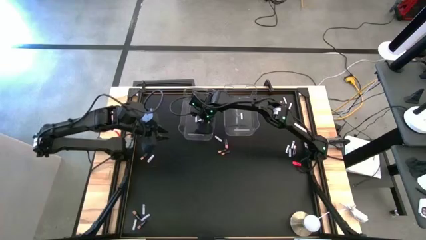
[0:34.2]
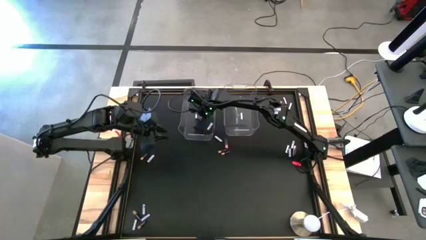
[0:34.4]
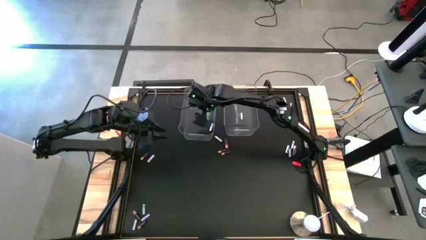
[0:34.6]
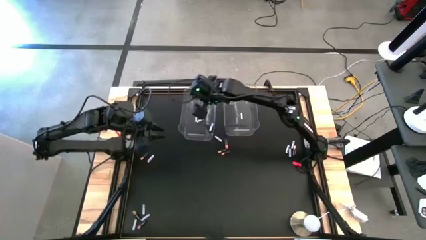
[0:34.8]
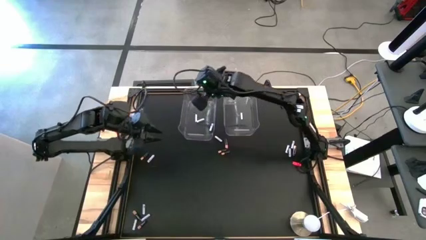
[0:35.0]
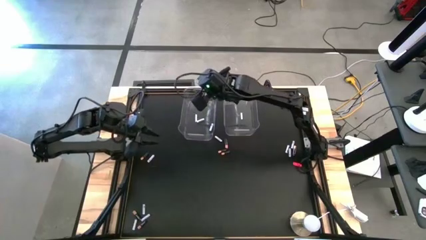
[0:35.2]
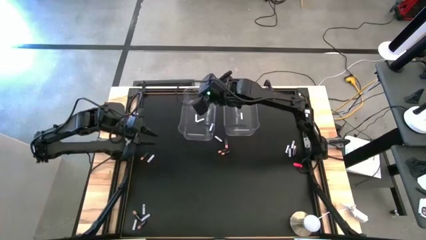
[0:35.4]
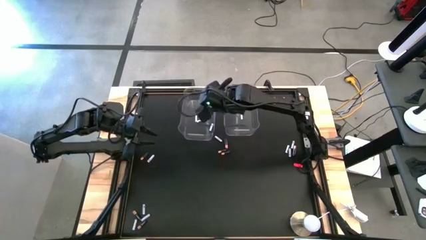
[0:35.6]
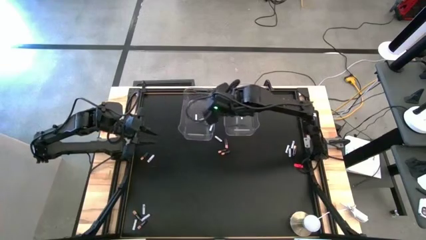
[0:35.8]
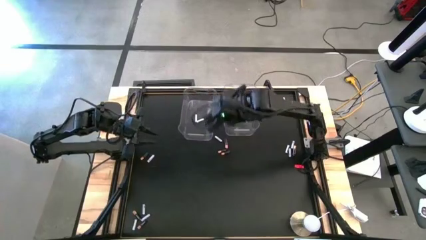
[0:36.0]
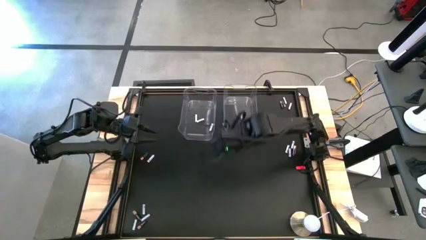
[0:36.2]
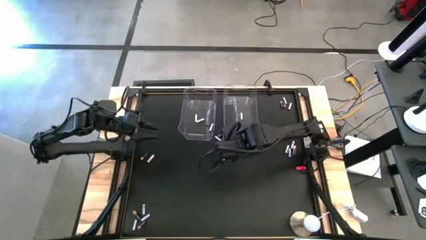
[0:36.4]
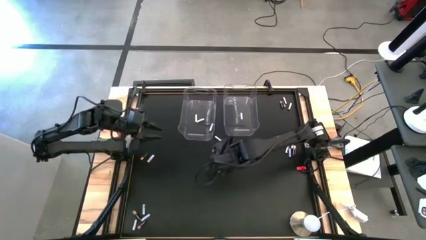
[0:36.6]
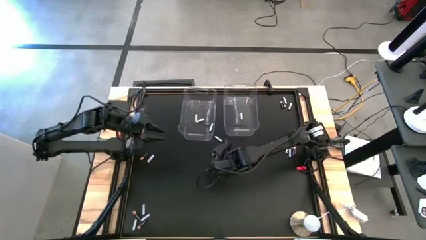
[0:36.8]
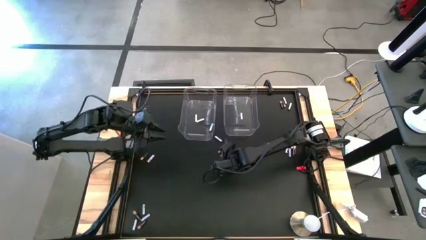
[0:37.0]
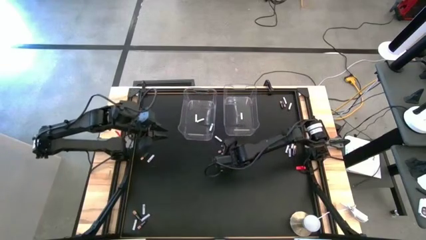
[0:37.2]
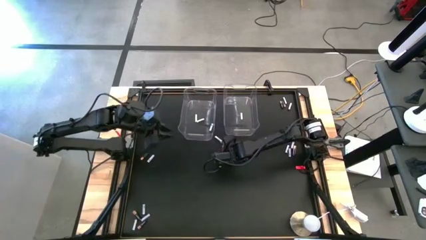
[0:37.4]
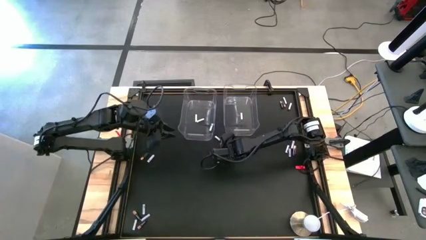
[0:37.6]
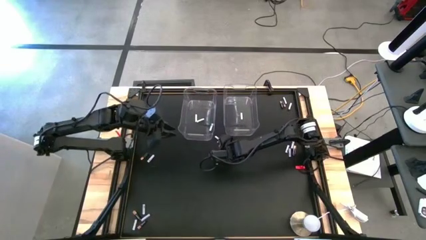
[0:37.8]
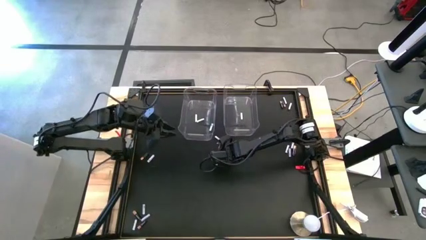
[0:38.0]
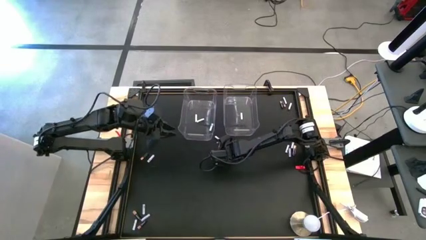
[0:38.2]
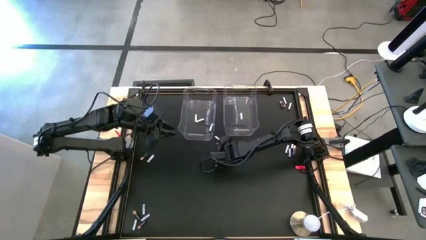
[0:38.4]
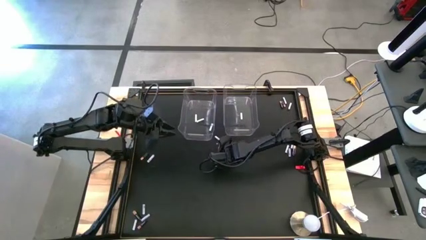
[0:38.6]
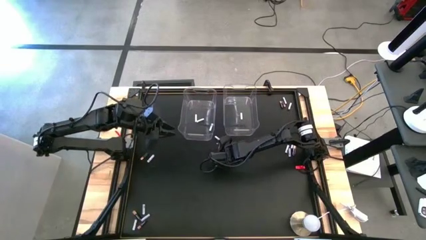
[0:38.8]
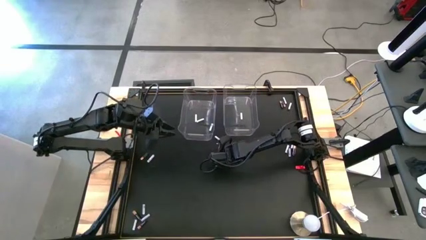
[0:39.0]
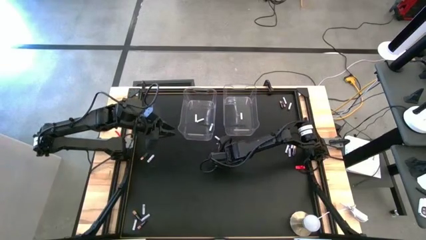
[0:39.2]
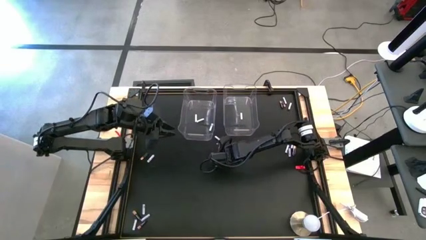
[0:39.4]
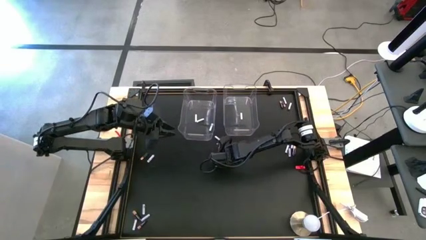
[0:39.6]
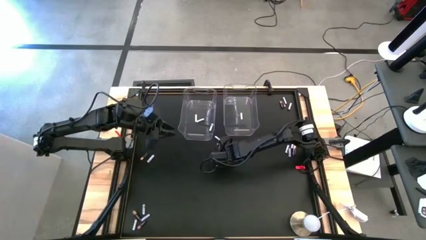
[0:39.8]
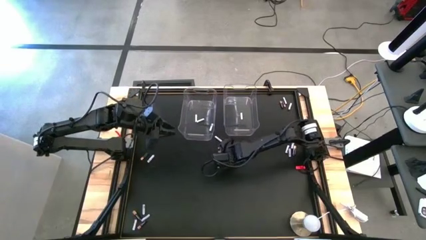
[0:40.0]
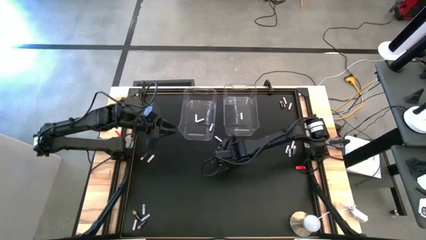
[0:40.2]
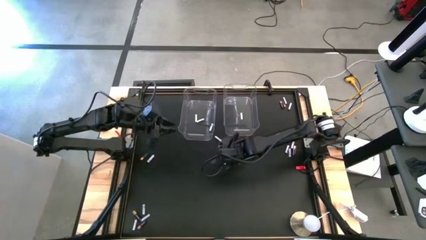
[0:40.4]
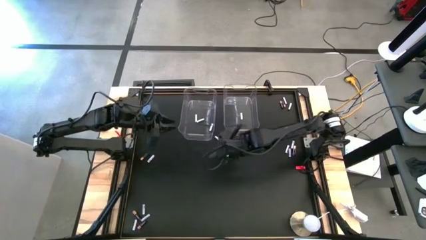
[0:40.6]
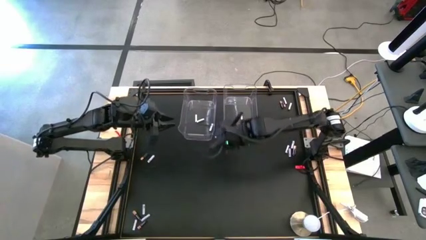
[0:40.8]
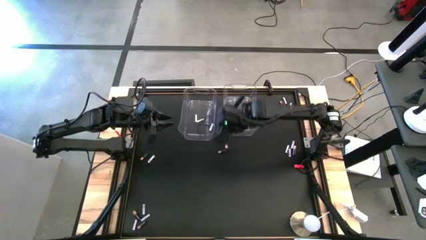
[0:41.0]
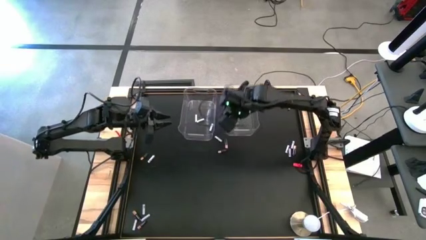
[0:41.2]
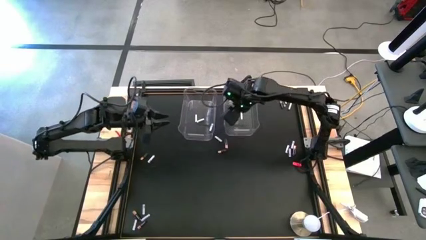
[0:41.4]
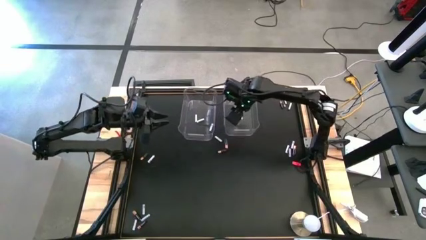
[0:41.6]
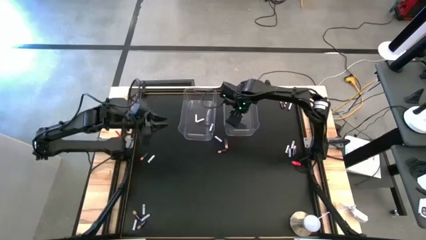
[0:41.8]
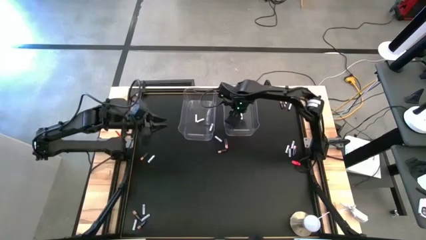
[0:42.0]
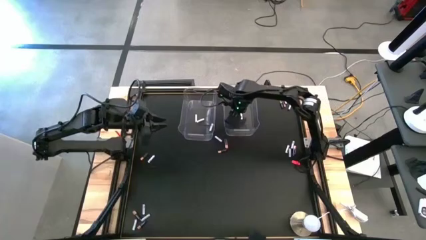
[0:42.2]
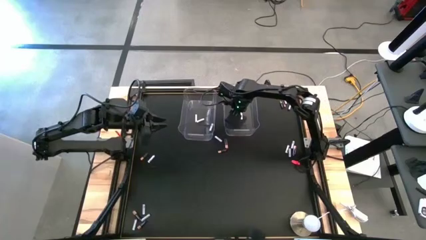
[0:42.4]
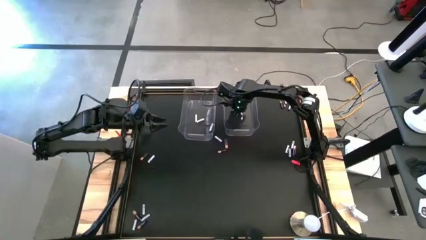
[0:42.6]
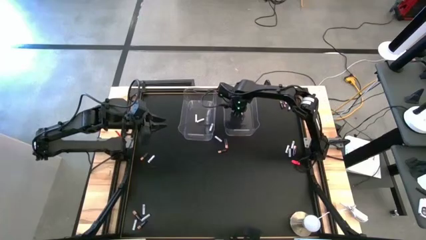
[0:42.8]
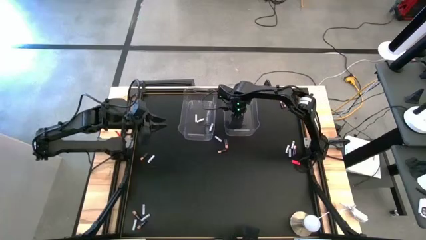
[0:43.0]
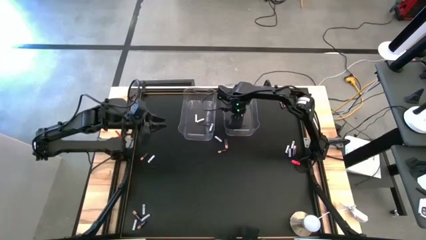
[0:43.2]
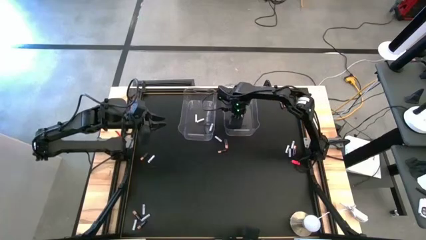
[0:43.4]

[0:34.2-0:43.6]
Task: Sort batteries
Put the black battery into the right transparent bin

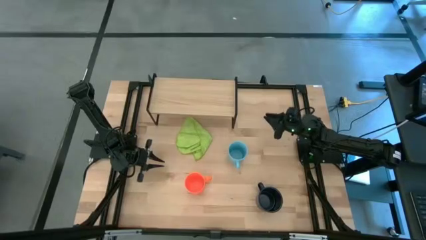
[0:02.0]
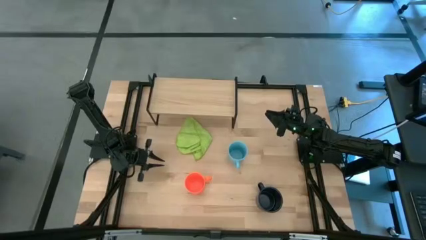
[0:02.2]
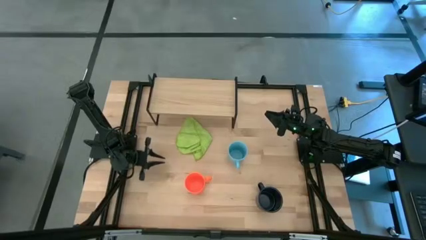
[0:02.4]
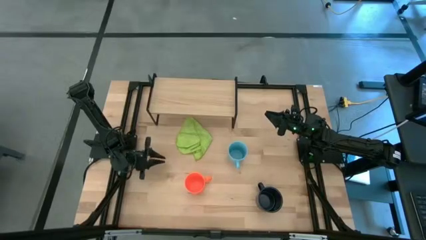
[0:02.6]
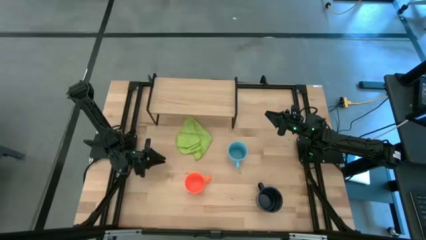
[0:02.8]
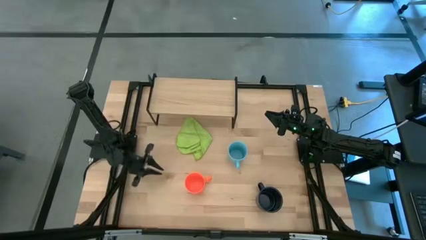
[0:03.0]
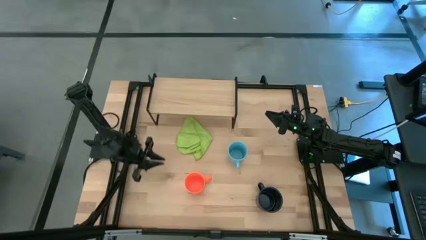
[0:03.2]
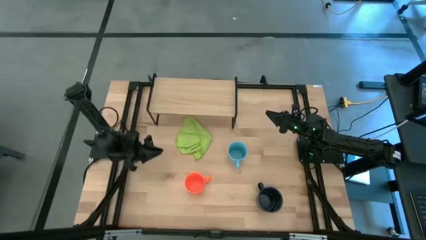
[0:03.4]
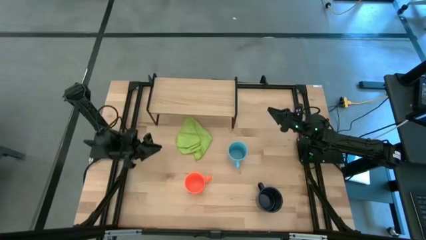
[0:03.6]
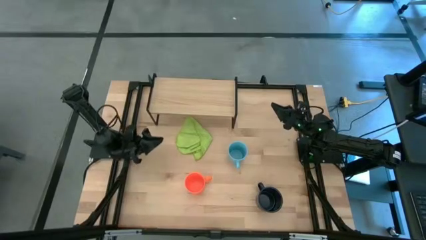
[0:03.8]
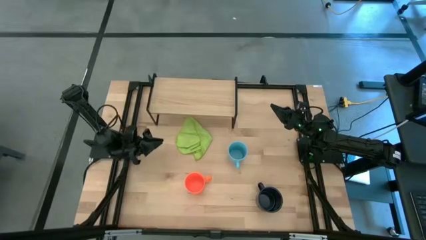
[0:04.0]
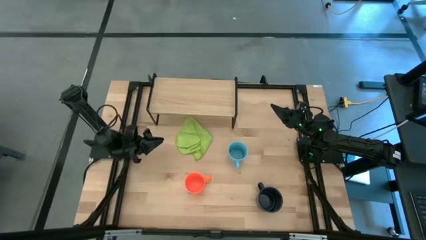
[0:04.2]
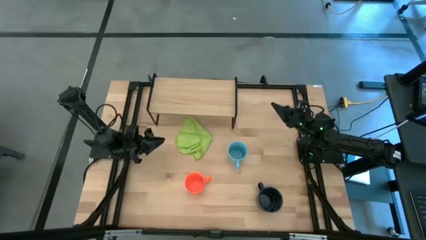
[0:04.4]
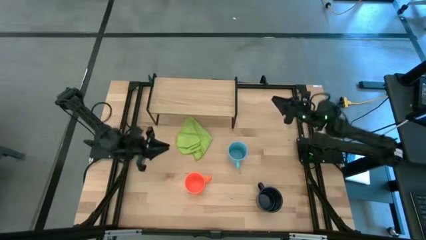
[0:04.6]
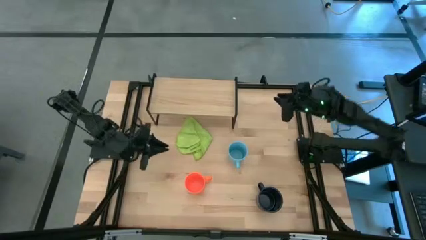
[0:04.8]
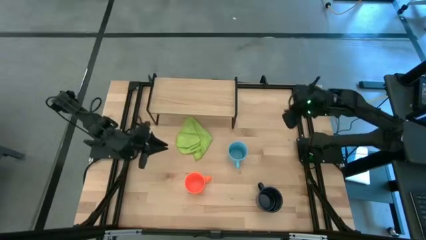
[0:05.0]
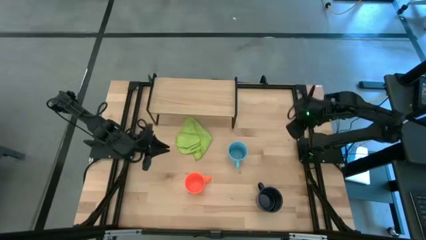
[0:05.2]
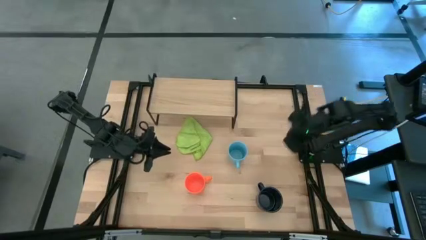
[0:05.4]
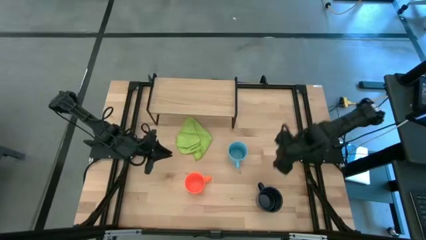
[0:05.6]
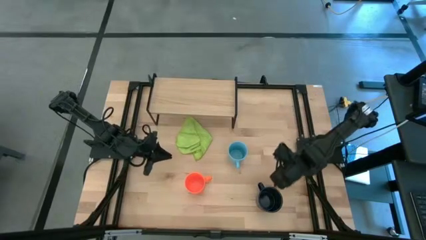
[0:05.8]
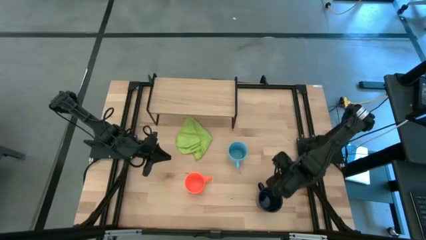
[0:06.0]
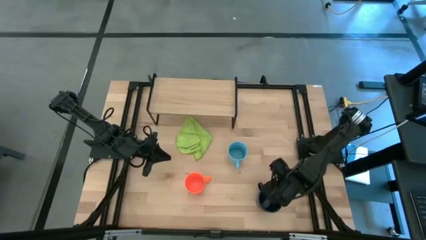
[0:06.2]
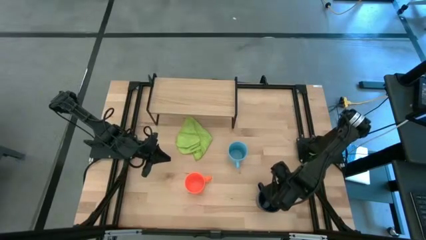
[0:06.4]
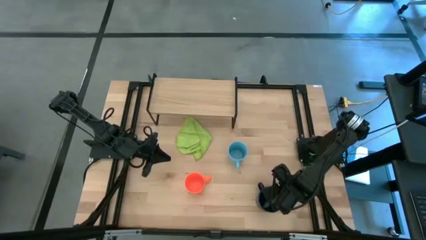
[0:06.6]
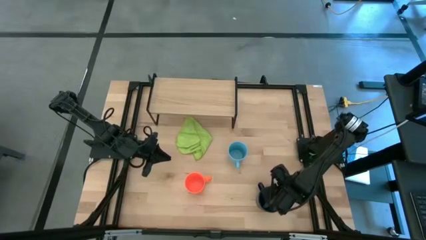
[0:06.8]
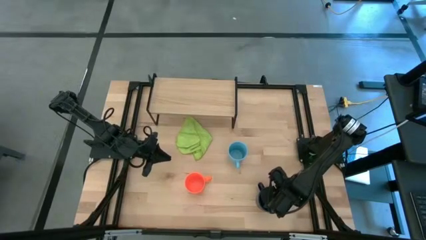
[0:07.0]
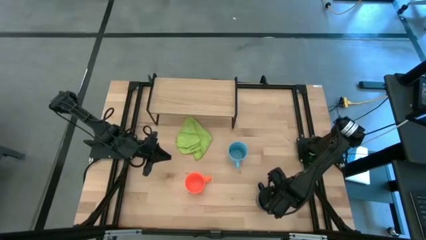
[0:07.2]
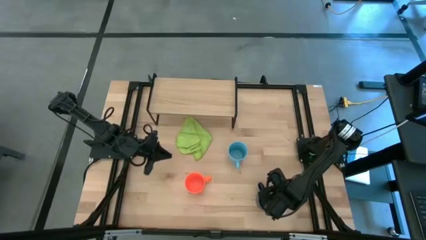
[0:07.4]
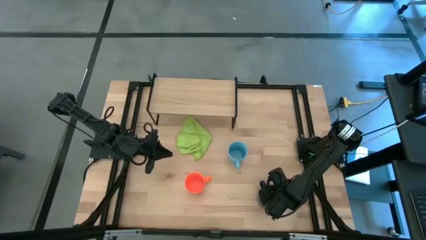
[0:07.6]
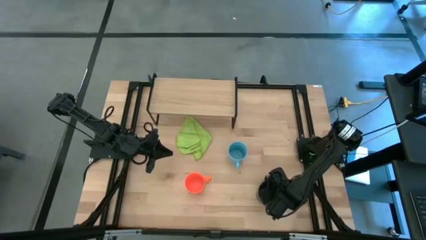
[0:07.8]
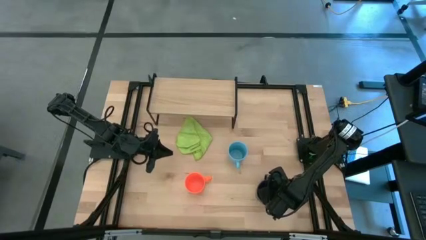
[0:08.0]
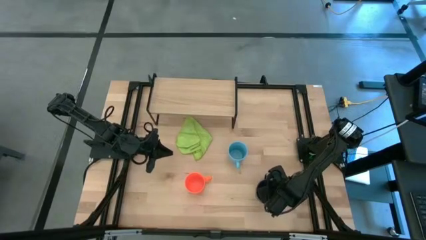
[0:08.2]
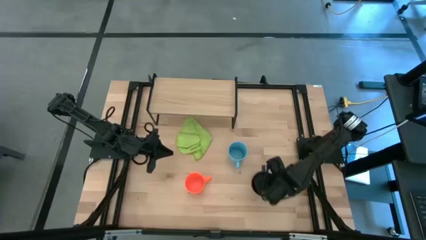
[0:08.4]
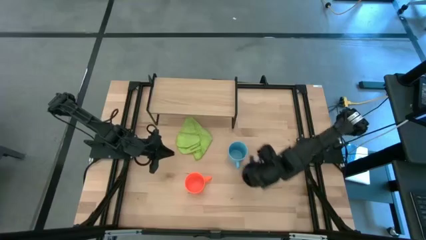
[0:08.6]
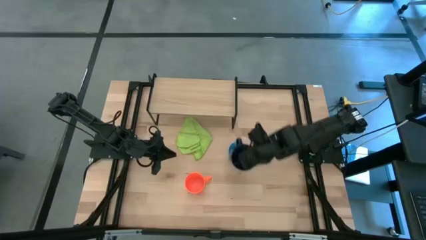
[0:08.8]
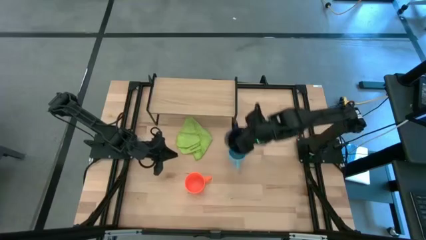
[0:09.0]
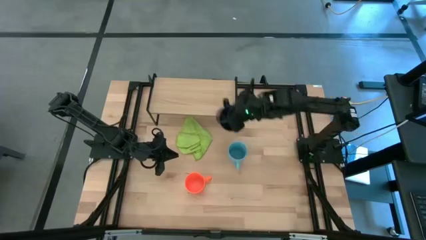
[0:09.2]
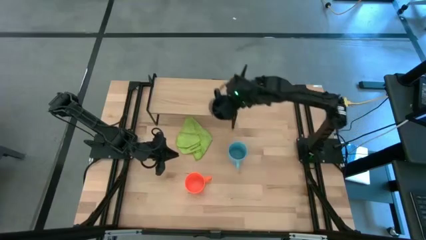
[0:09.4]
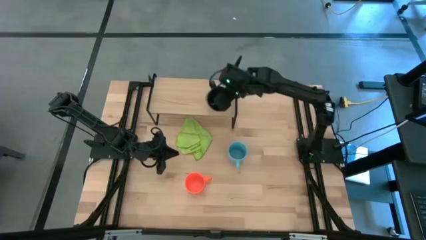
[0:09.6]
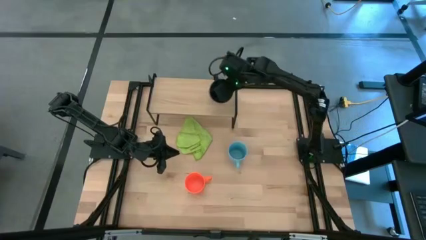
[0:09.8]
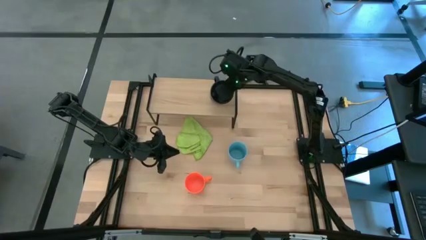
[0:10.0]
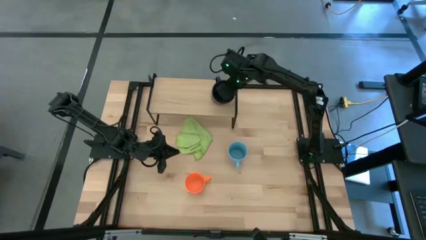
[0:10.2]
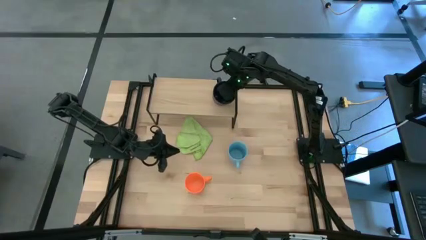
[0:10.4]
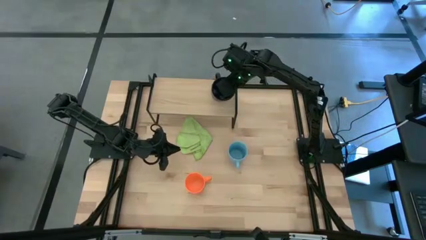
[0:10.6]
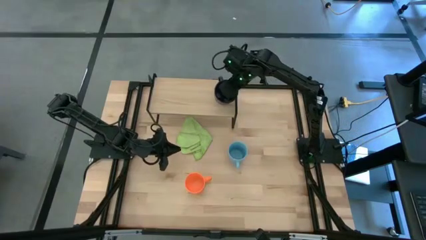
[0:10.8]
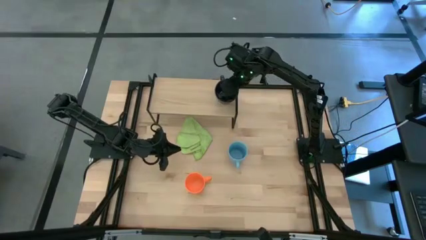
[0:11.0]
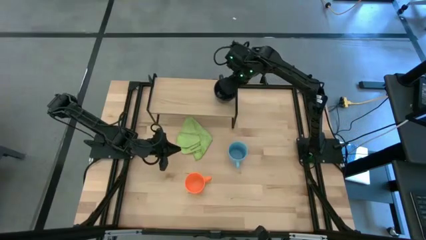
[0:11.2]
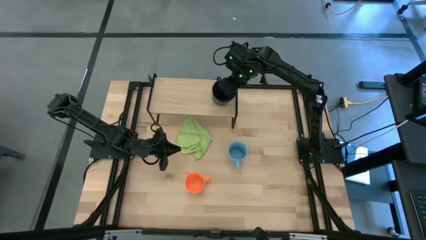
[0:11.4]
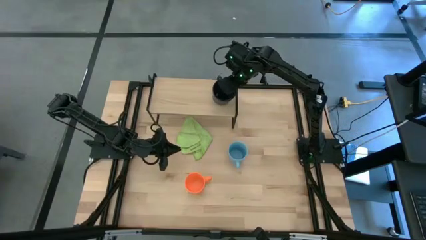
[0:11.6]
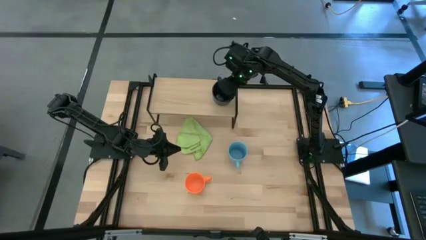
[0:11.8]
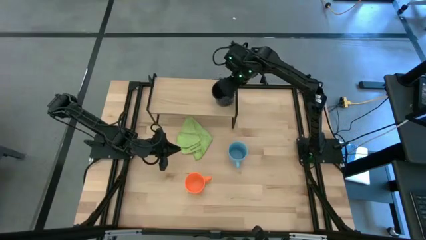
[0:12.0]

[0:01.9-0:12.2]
Task: Stack small to large cups/mugs on shelf
Put the dark blue mug on the shelf
